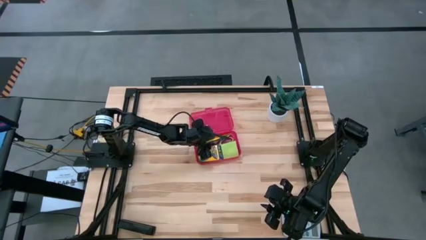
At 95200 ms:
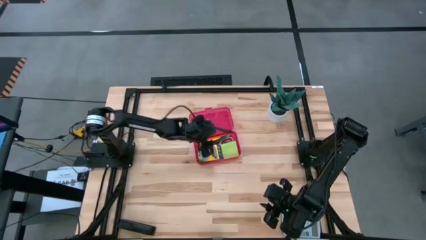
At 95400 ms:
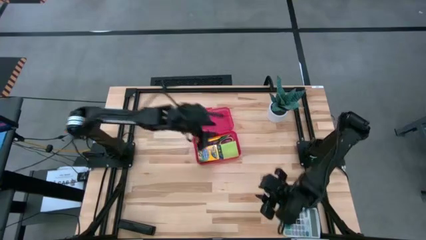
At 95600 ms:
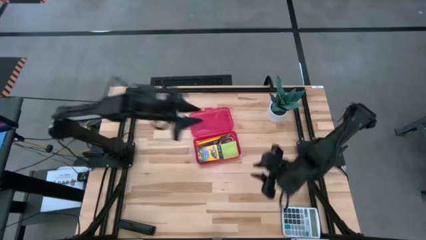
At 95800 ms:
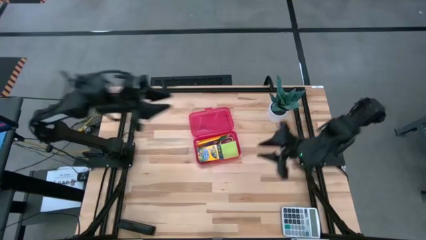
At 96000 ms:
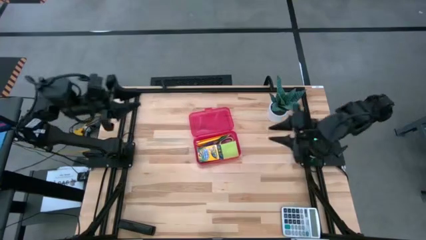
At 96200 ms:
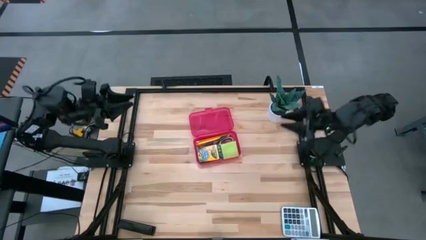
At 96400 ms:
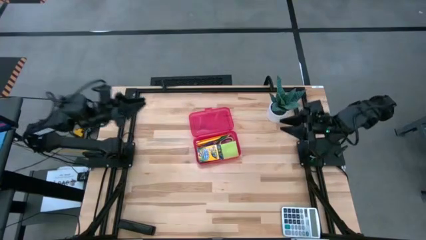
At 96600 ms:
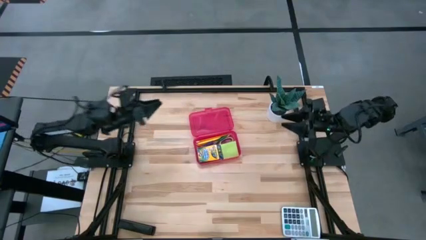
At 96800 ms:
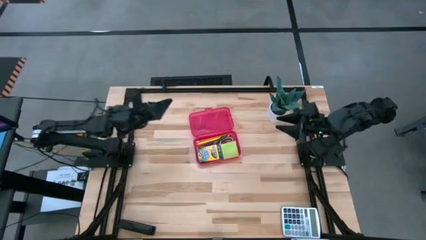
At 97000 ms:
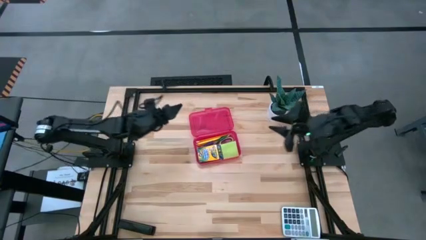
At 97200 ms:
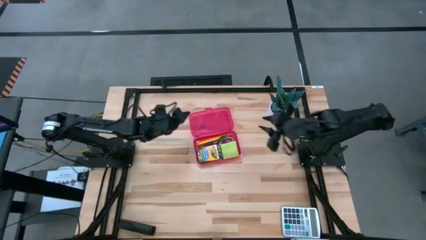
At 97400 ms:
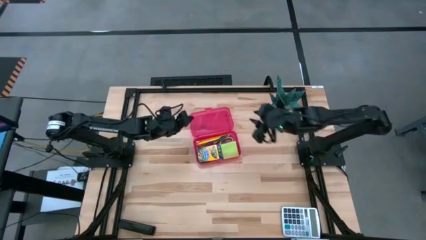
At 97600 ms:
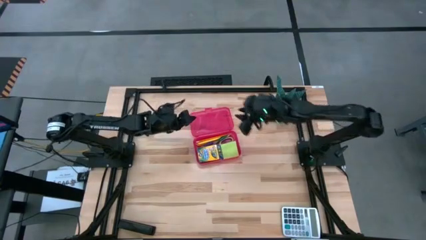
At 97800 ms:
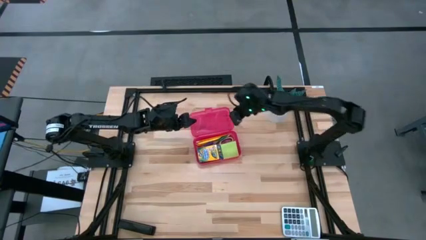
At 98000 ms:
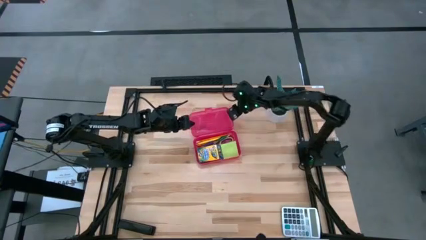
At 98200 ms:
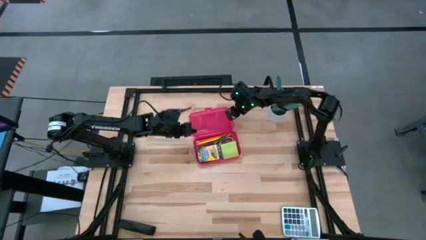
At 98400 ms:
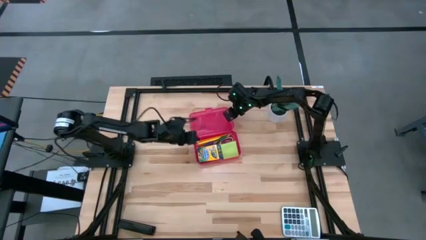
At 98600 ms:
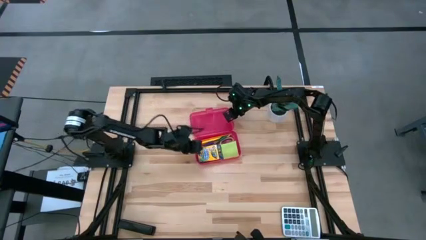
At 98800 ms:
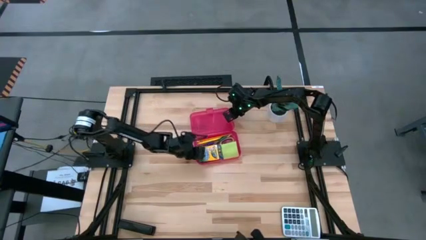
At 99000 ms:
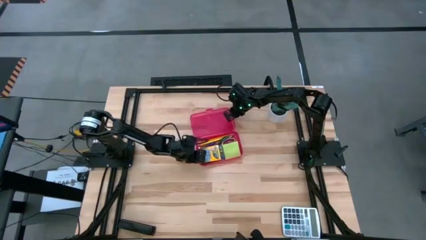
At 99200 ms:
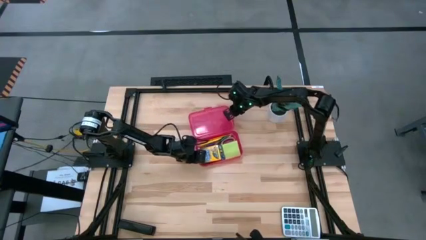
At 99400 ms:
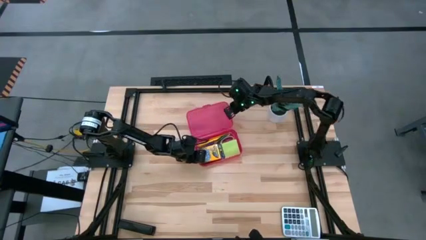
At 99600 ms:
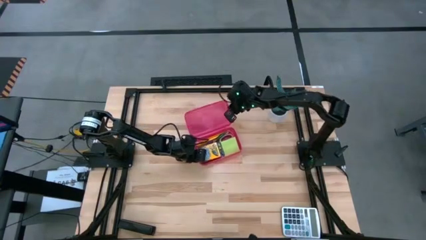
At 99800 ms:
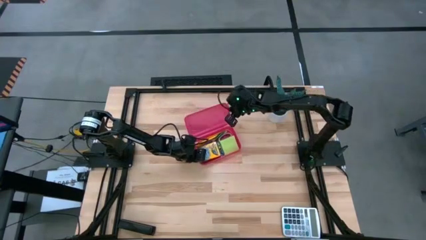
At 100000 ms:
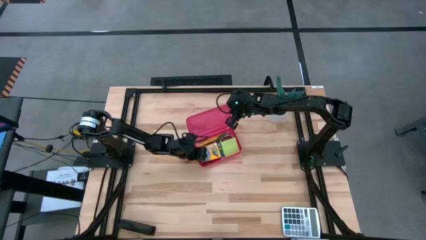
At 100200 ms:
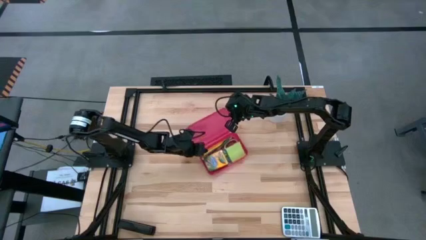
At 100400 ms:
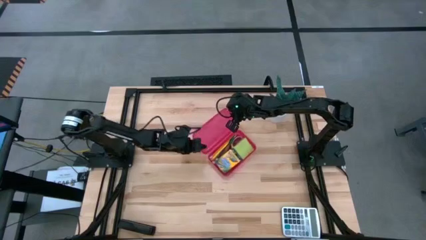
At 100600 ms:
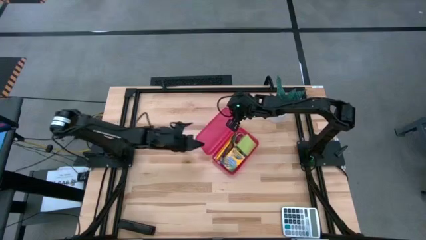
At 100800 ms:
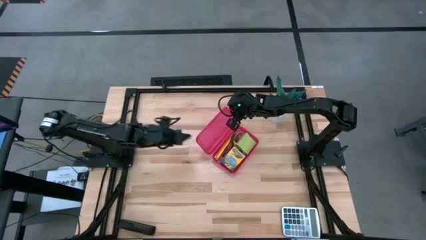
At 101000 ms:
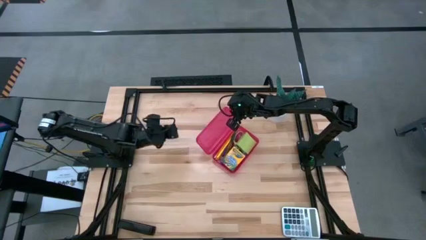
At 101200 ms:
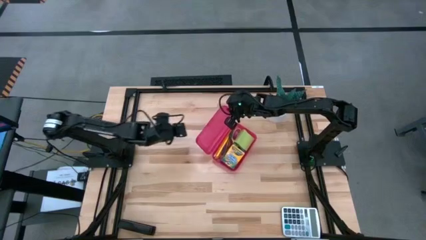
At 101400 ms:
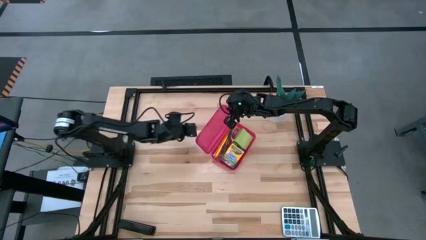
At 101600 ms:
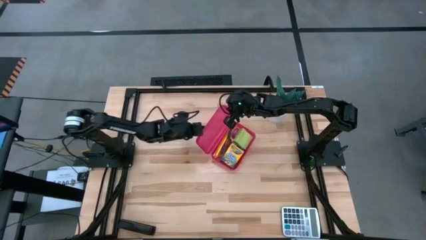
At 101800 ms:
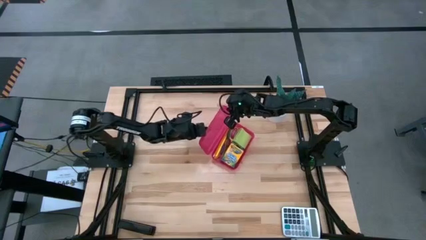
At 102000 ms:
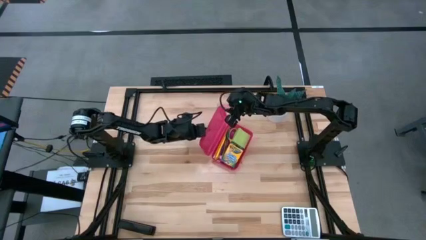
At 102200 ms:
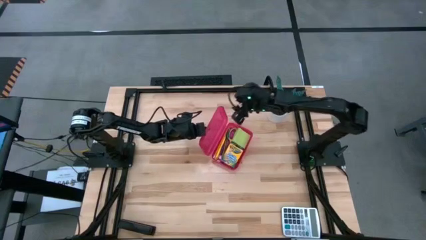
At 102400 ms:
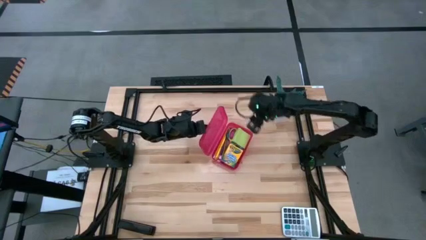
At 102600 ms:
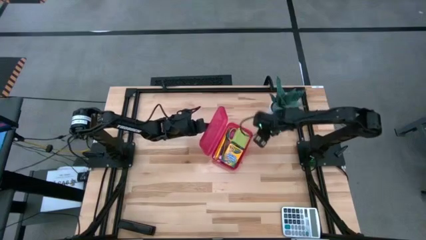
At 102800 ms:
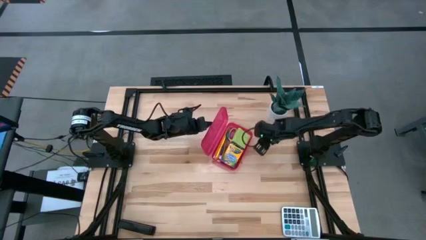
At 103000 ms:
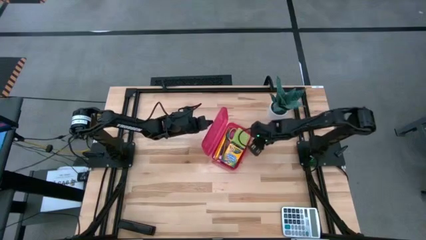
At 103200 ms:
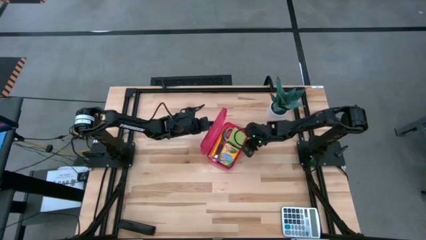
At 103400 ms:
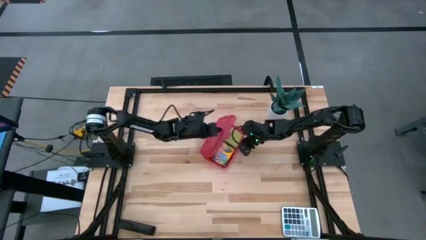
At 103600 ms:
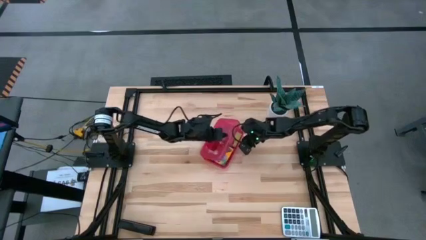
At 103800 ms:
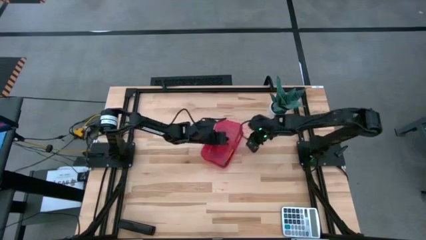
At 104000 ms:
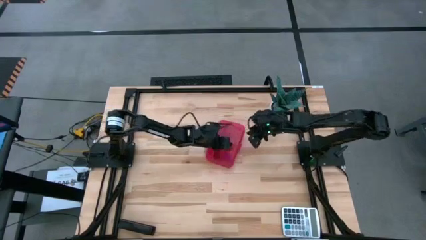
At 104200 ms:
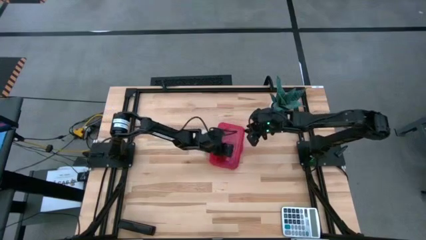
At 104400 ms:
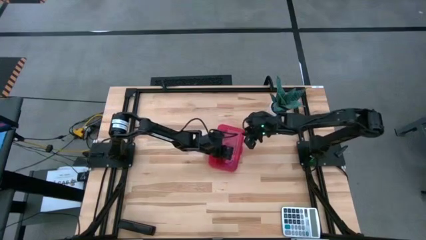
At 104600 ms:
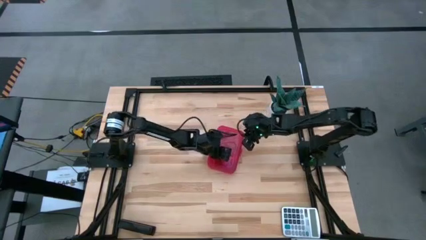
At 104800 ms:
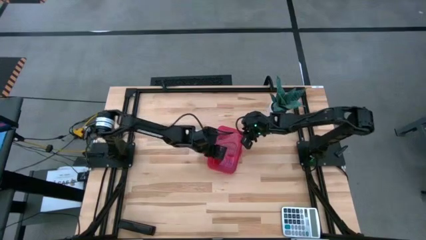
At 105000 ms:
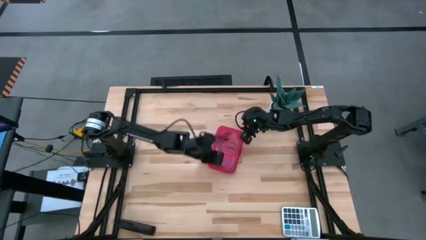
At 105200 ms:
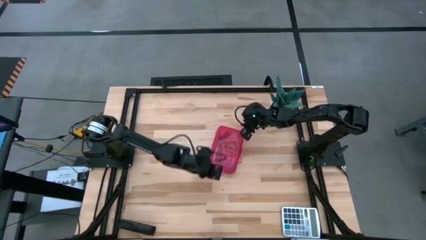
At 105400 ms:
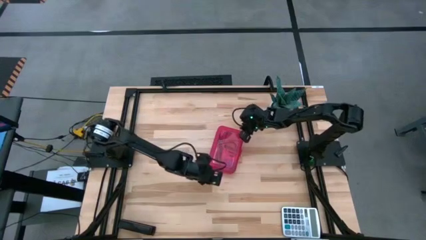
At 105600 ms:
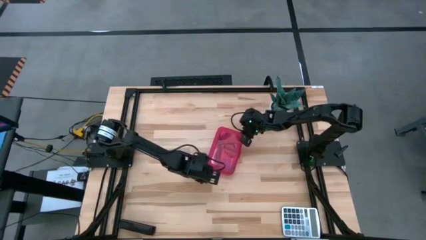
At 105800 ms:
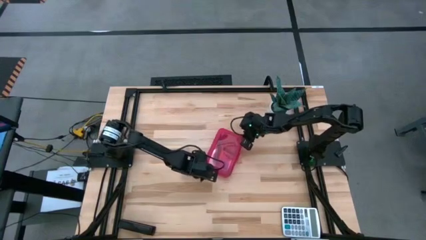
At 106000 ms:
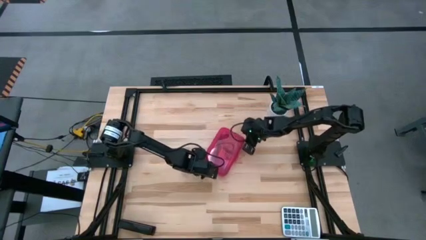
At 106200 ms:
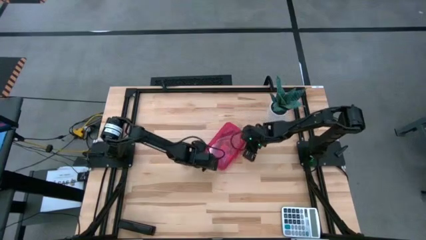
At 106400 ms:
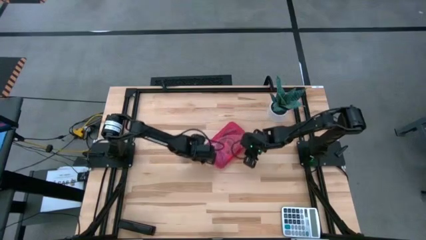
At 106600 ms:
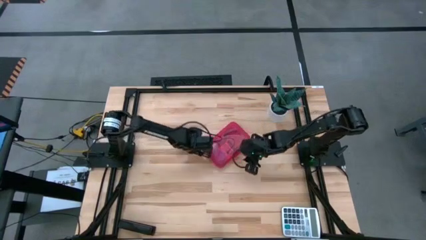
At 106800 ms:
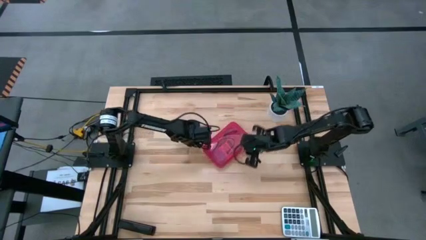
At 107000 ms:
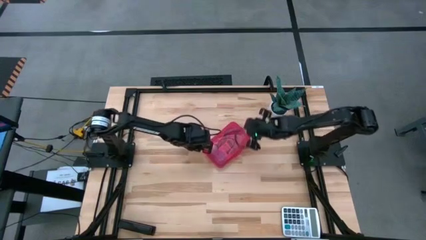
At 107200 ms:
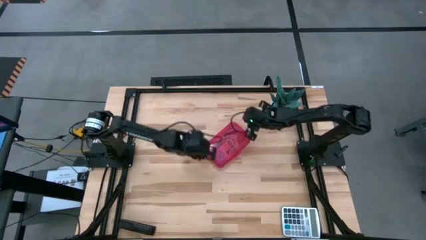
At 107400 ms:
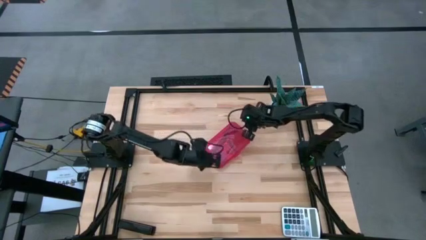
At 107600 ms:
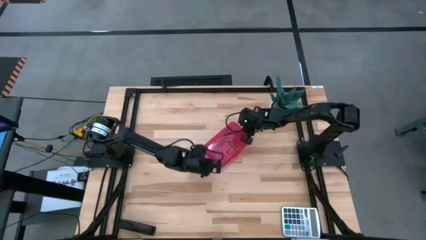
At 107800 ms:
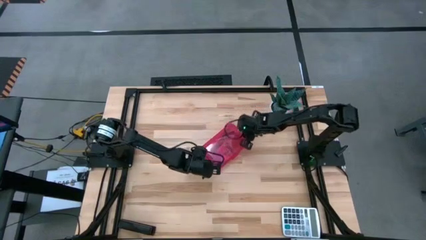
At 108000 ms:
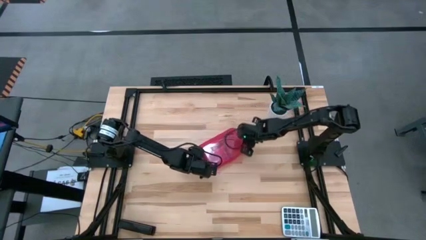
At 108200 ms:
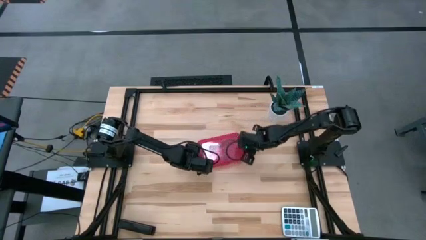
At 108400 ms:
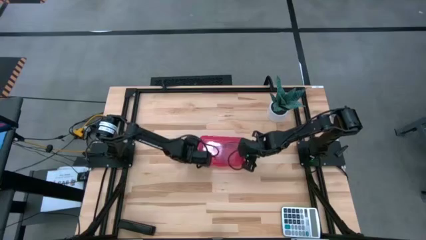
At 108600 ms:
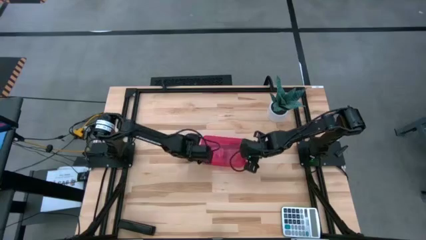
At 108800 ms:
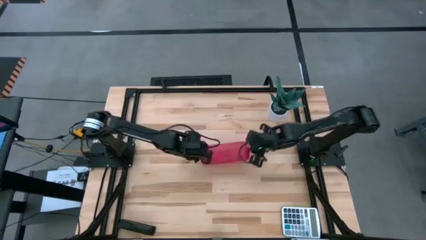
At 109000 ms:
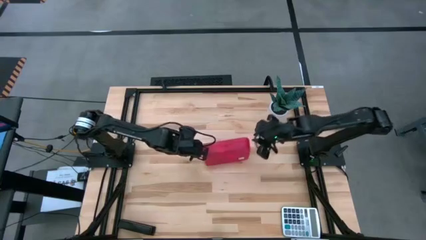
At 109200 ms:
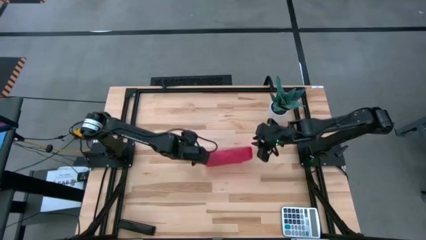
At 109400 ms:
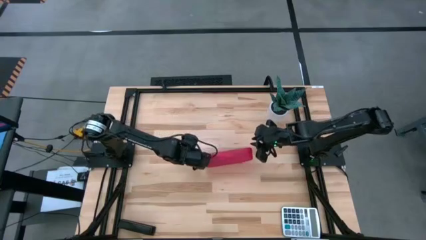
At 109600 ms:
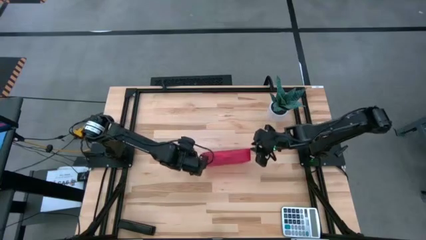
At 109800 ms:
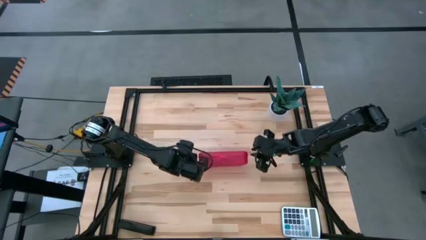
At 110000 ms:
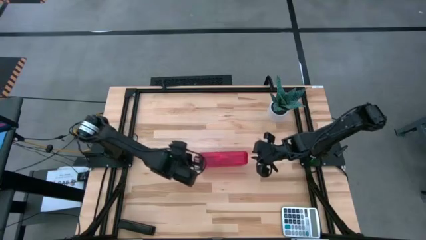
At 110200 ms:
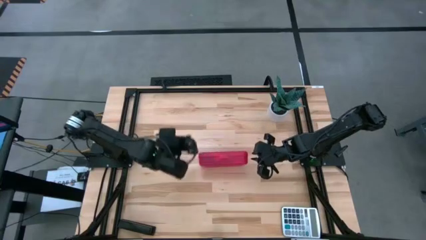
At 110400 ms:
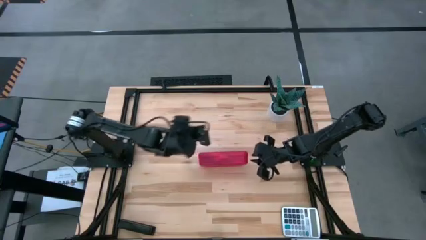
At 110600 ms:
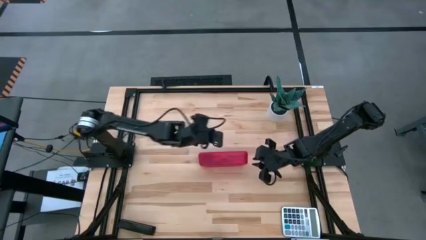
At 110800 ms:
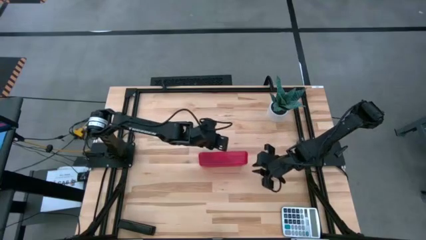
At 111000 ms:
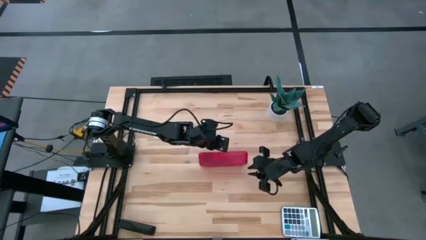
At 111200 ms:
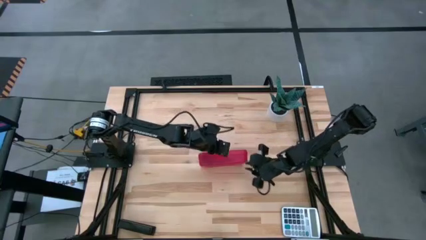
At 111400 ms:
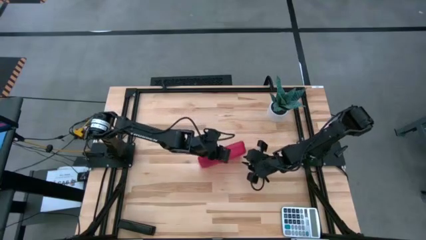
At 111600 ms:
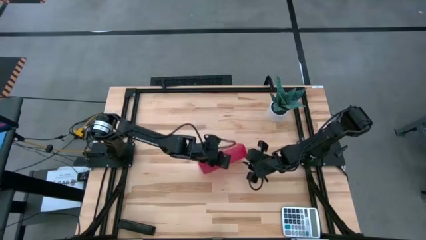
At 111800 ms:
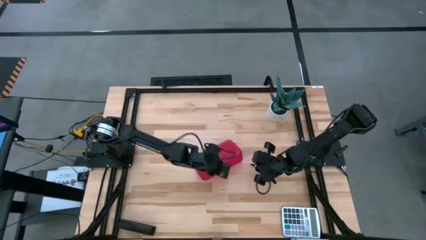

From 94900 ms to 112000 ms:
Task: Pack school essentials
Close the supply box
